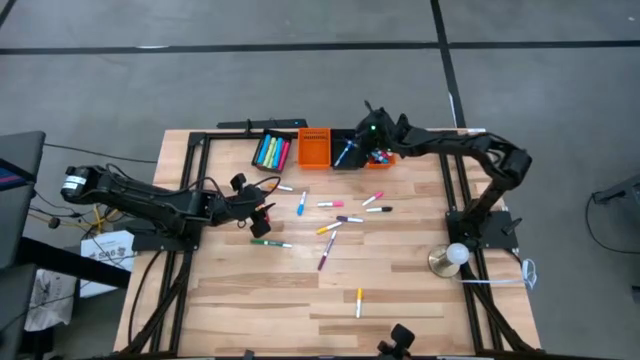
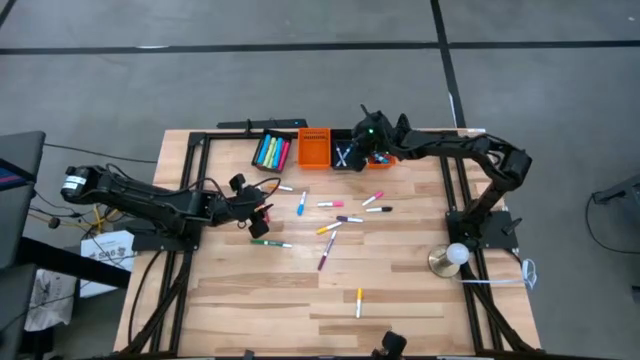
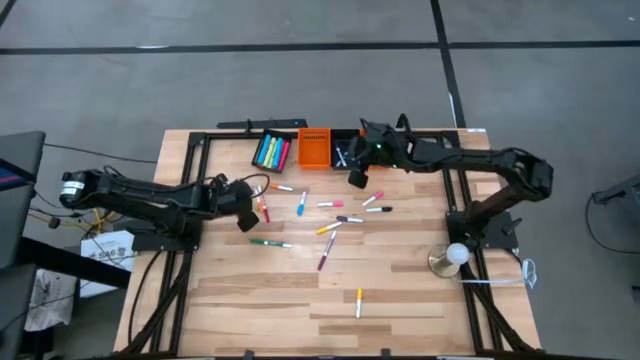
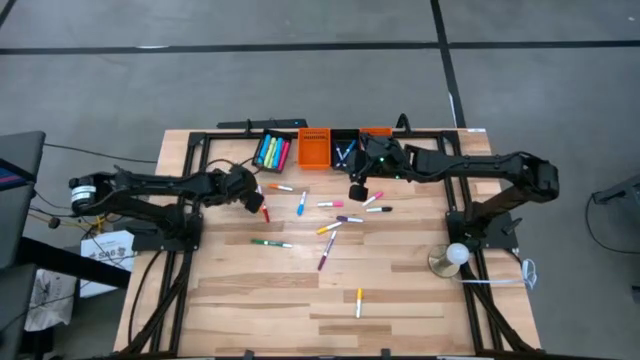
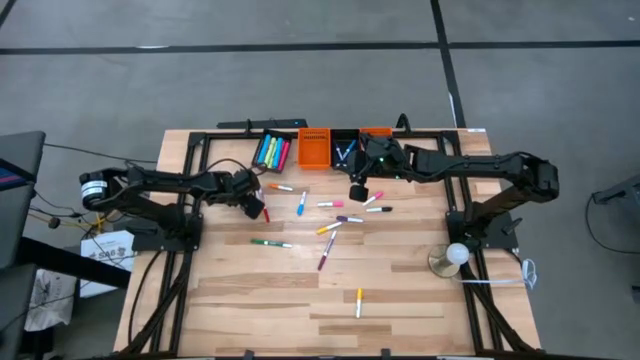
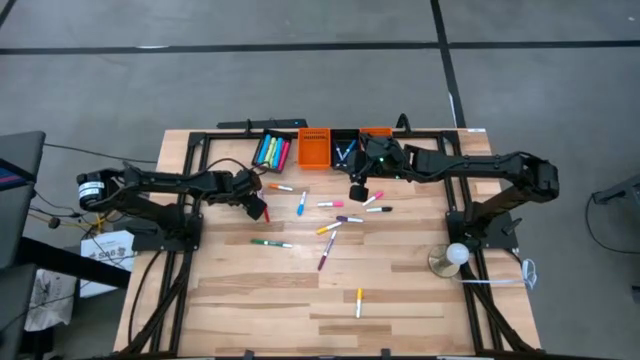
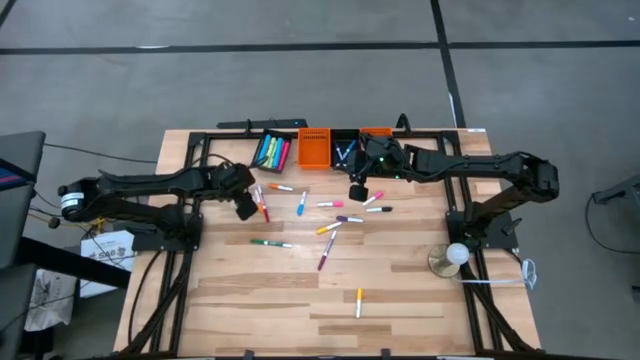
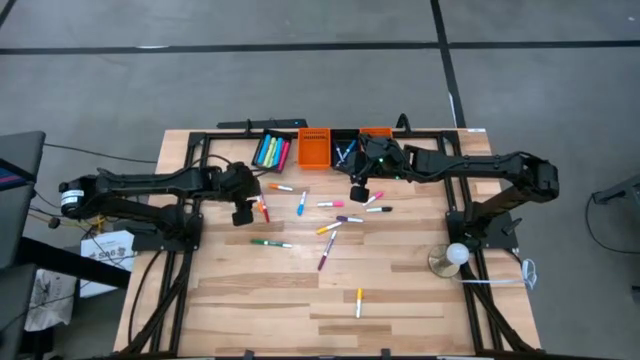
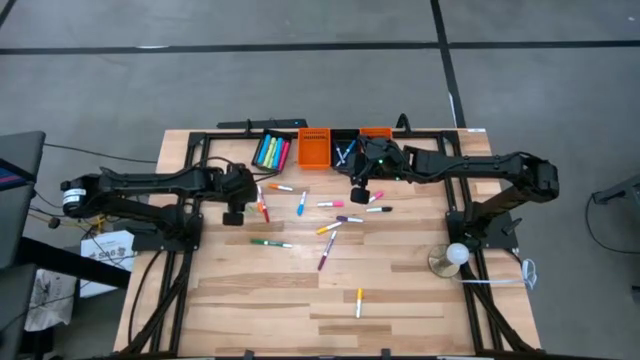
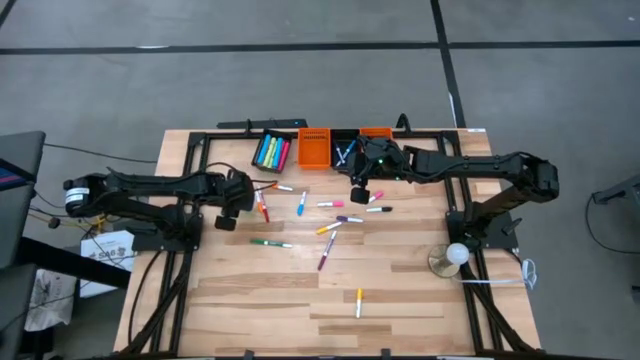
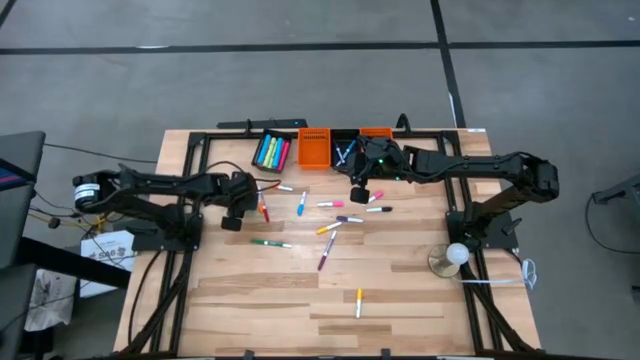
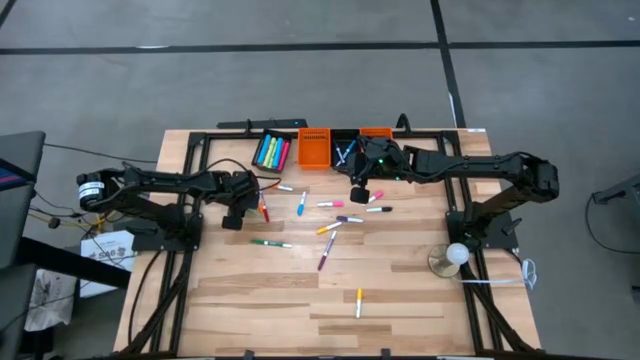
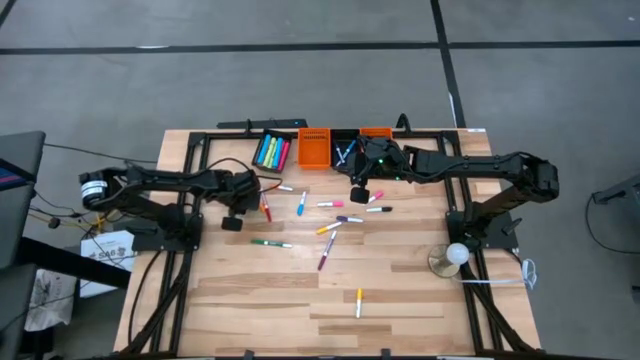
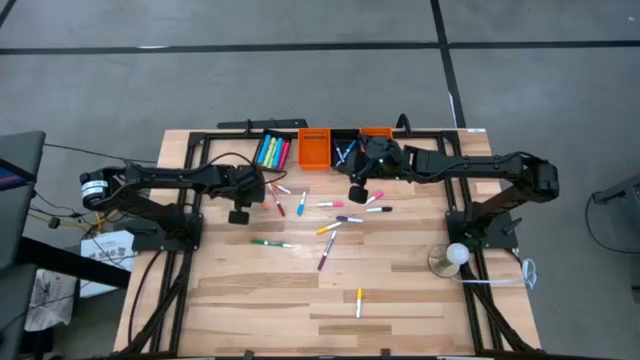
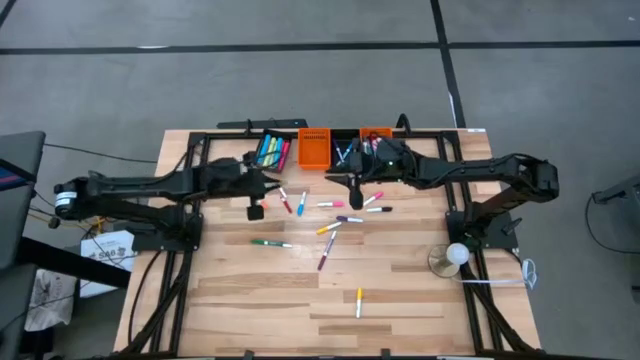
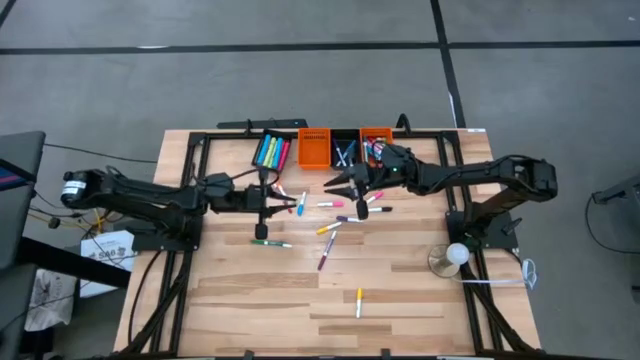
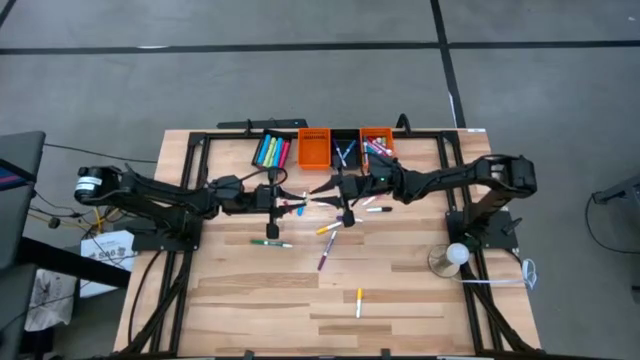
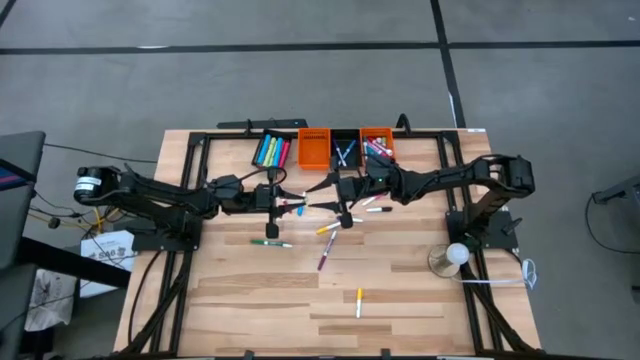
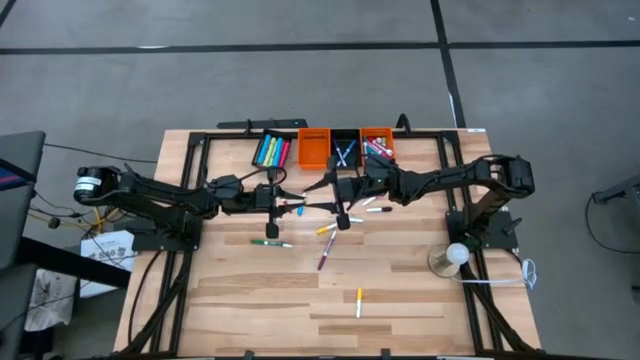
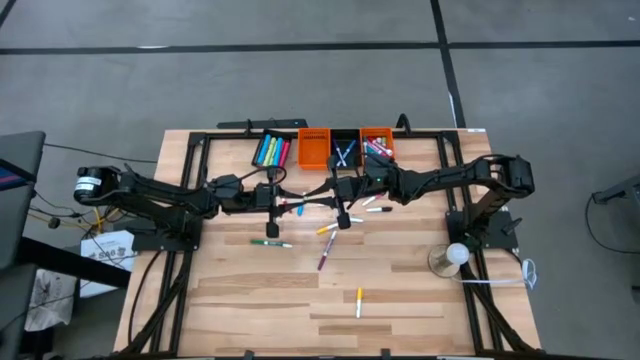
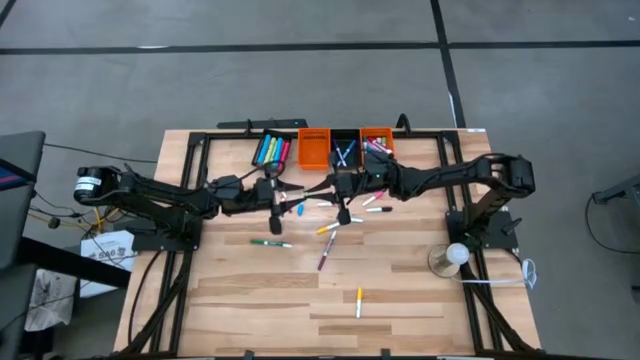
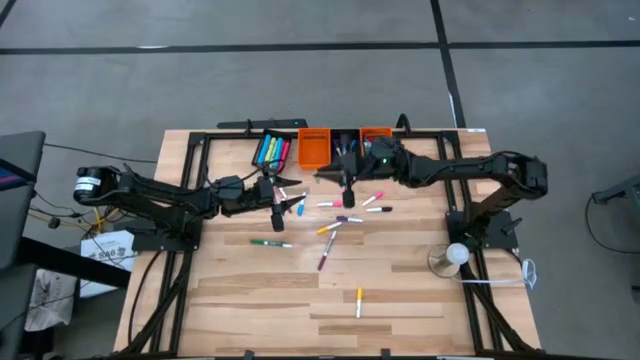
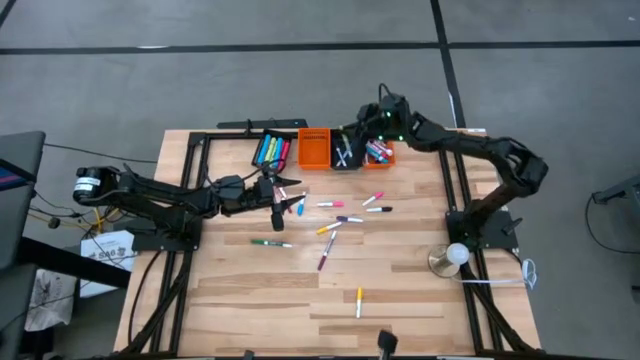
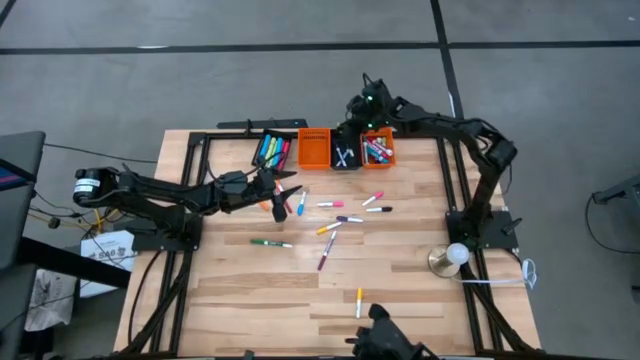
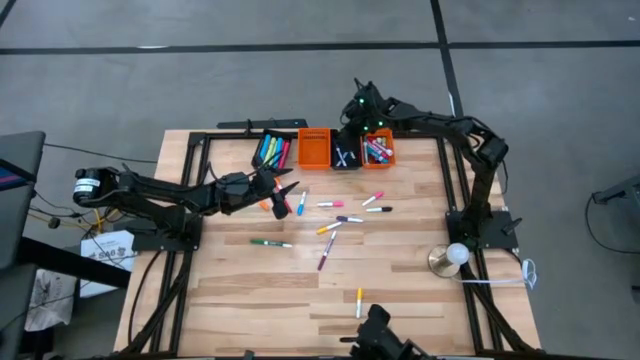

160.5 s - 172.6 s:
Task: Pick & Place Markers
Put the small light green marker pen into the right black basket

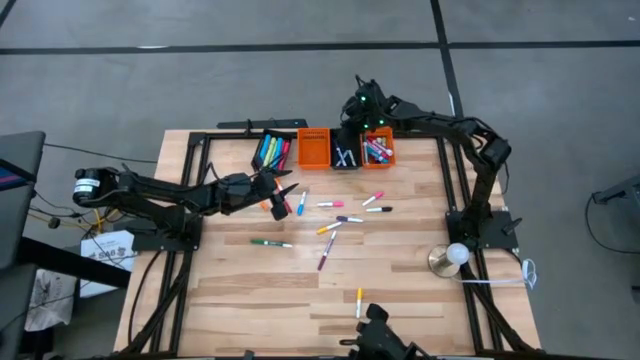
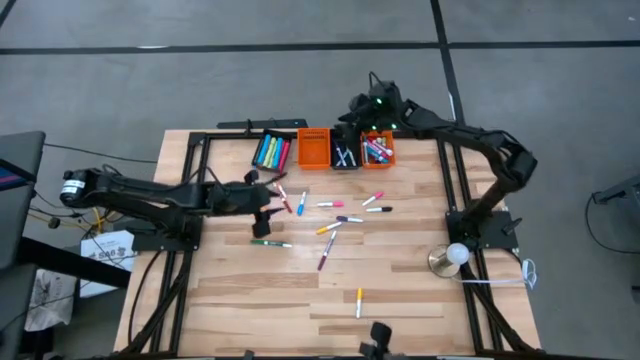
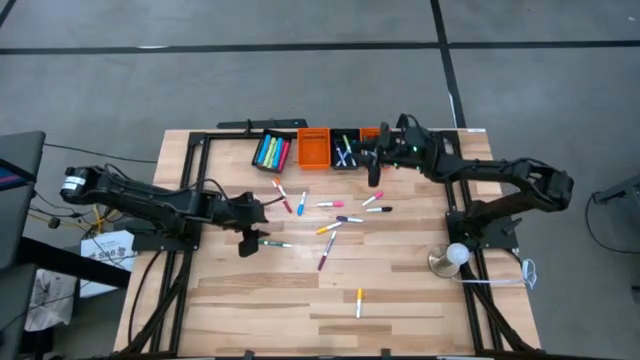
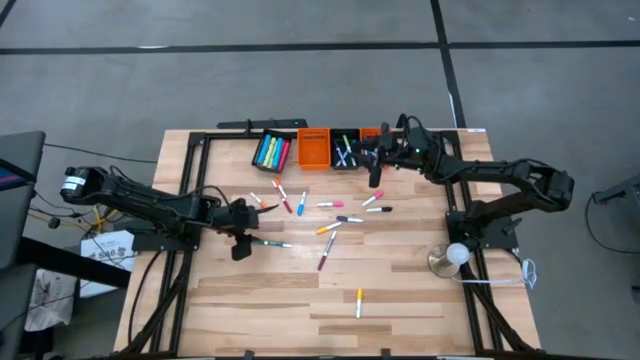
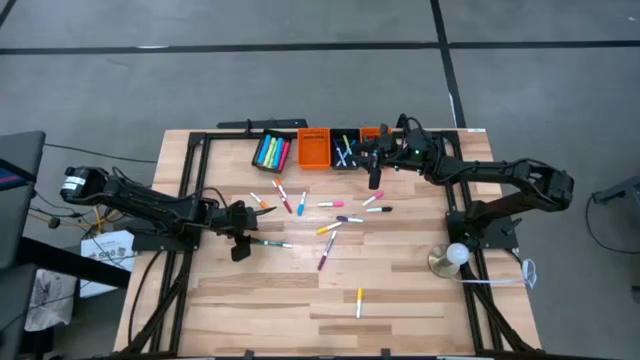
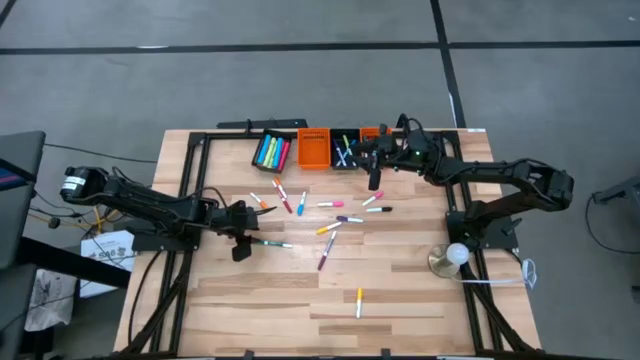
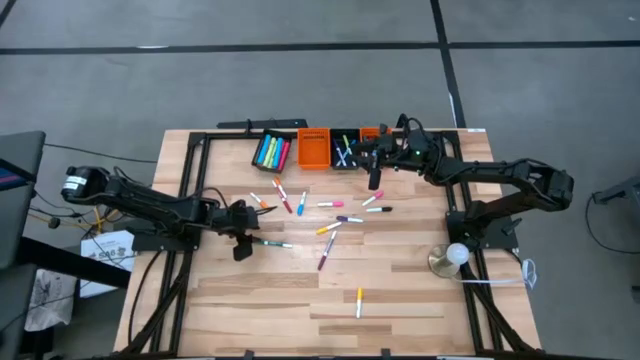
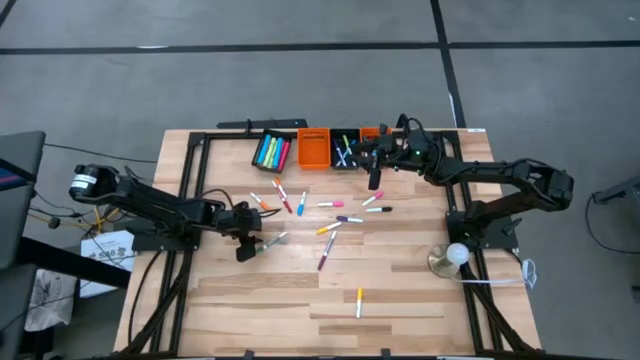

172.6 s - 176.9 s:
Put the small green marker pen into the right black basket

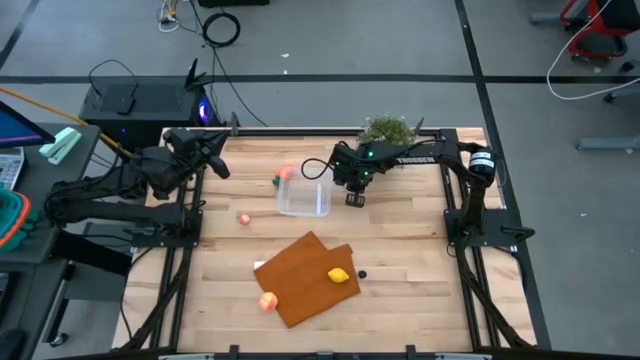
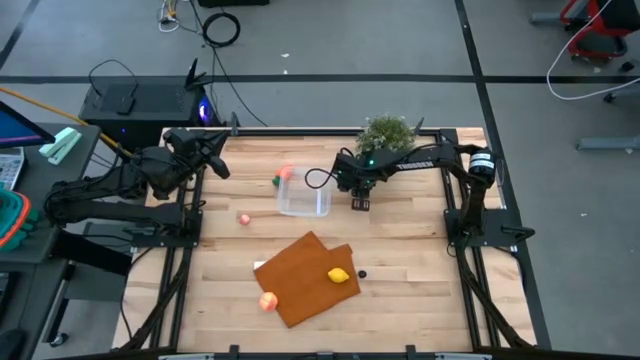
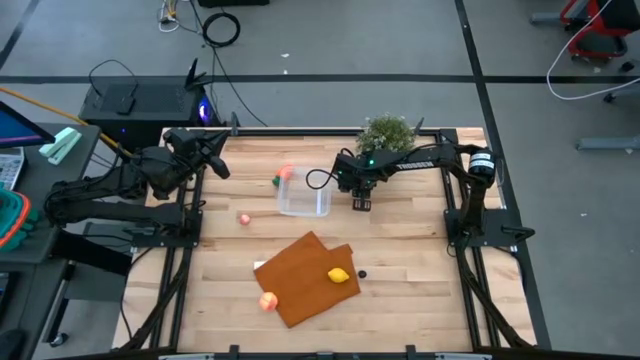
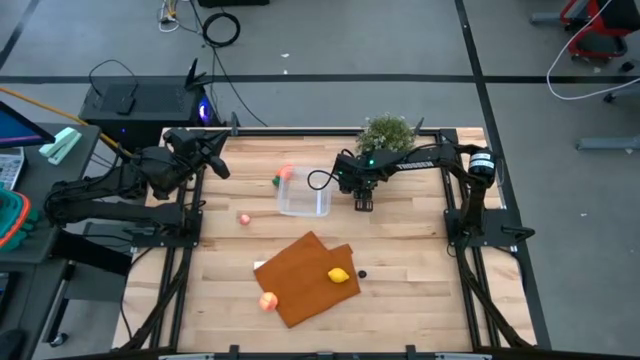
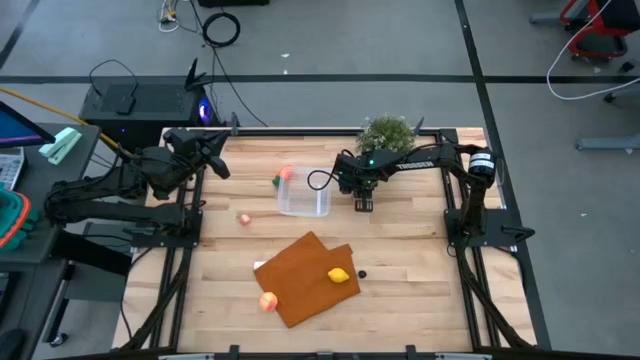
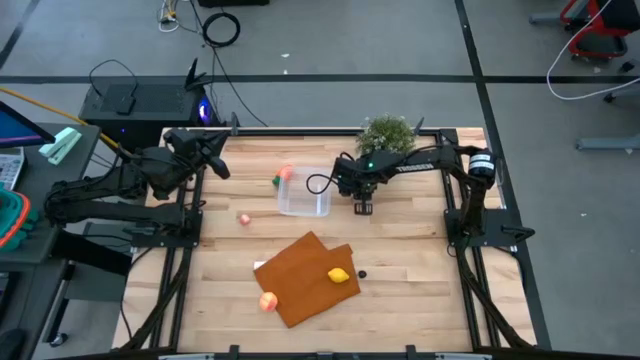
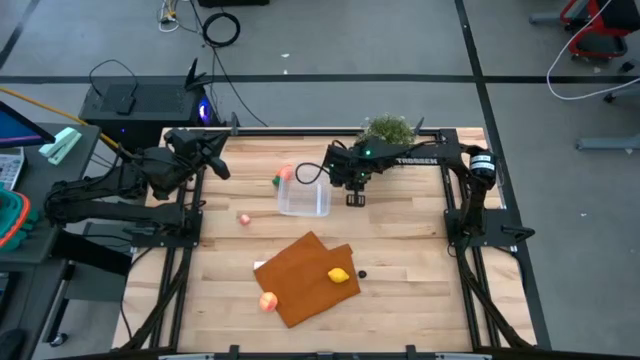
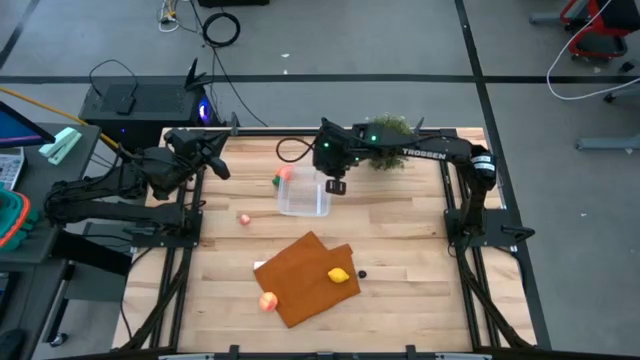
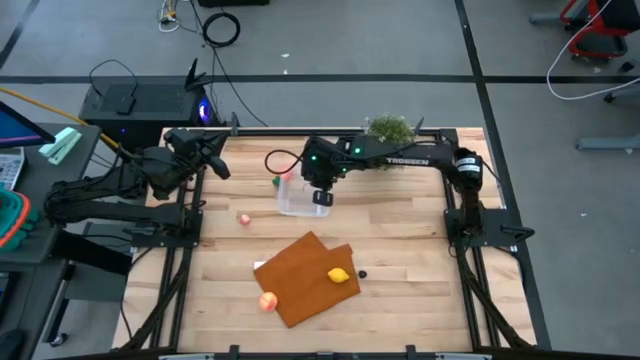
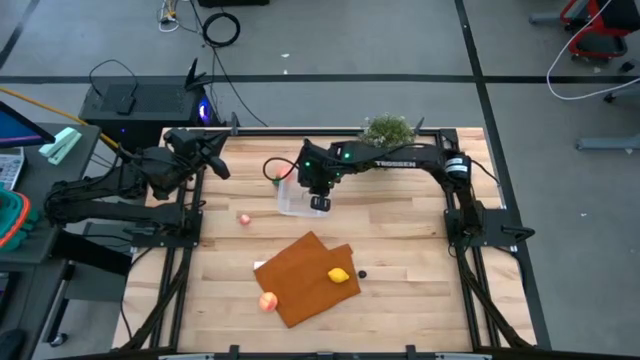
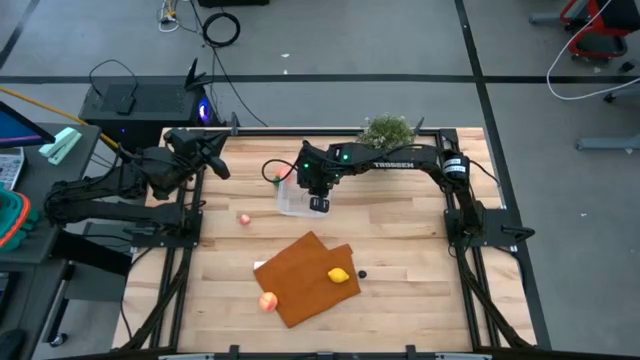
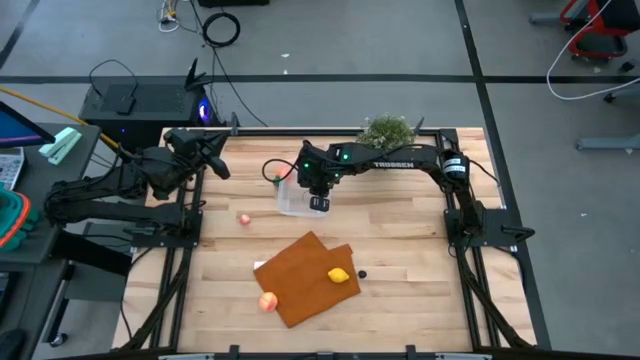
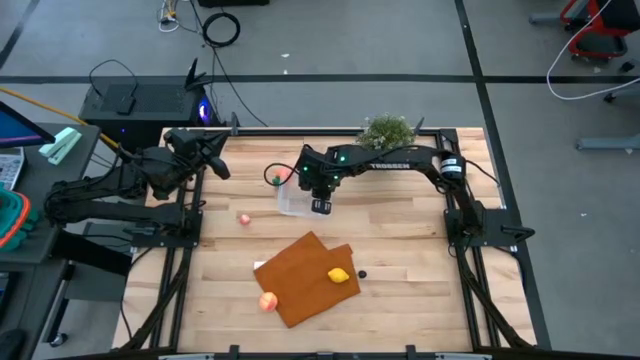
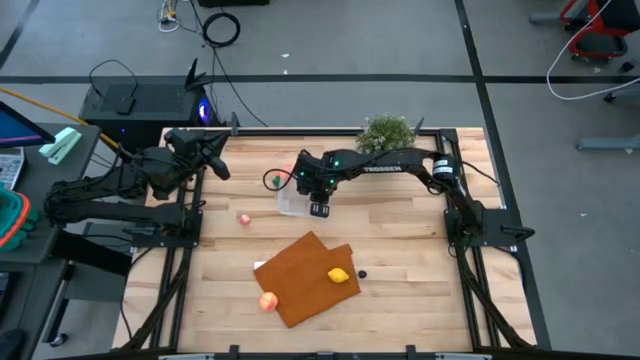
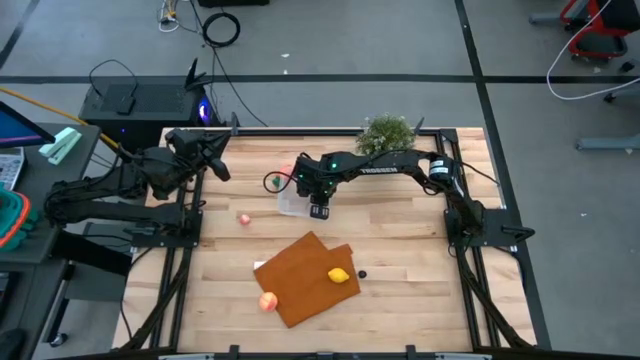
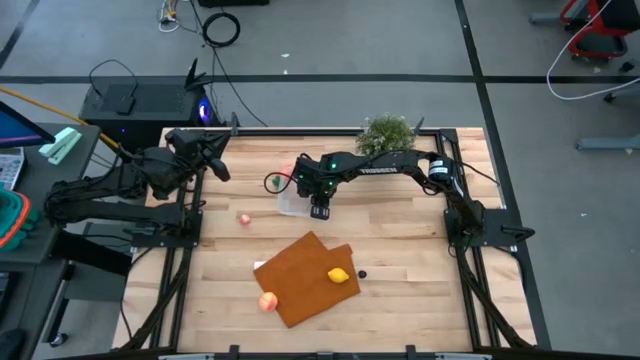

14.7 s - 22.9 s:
Task: Pick and placing Produce into tupperware
Put the red cherry into the transparent bin
